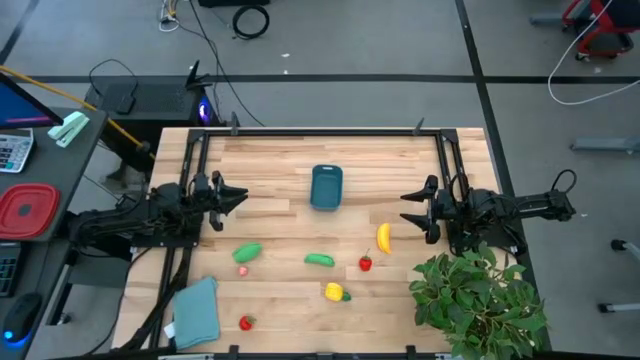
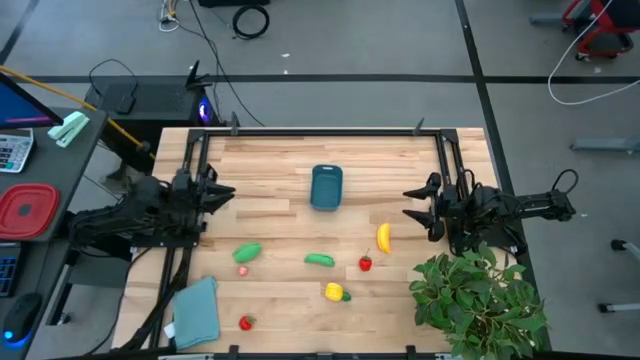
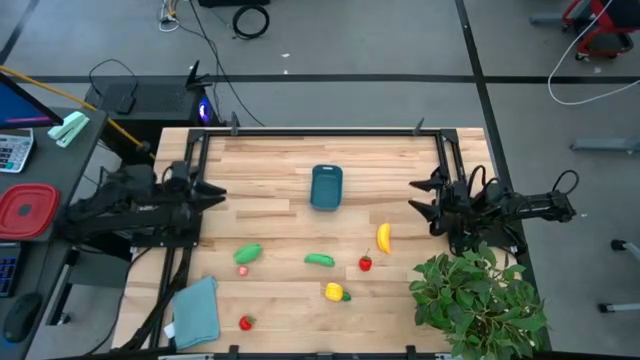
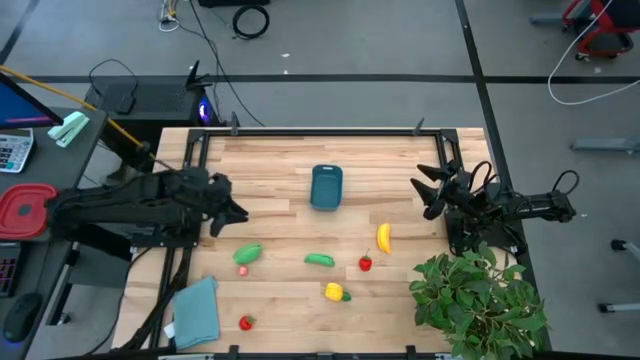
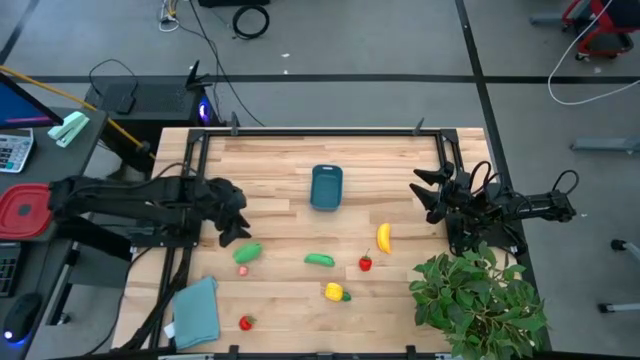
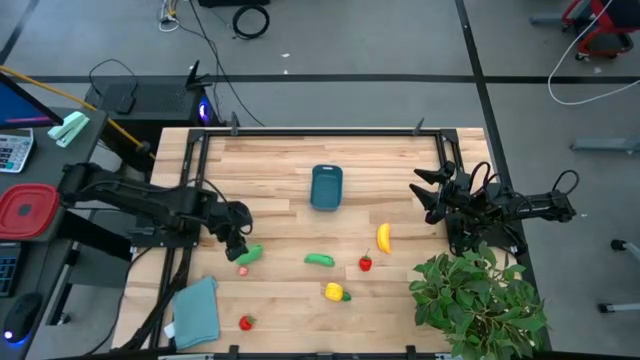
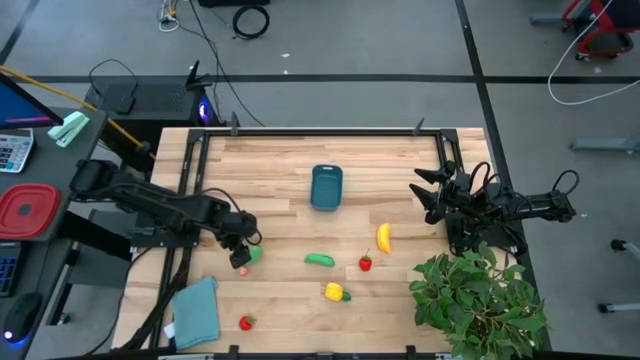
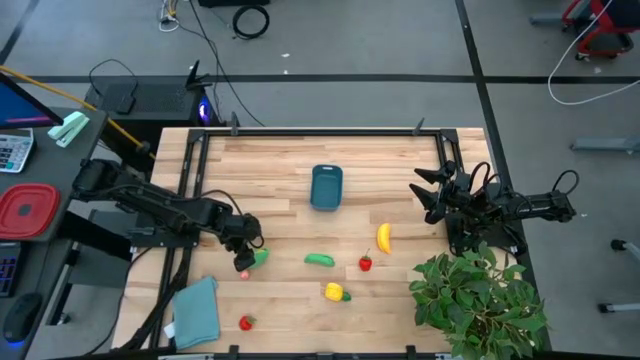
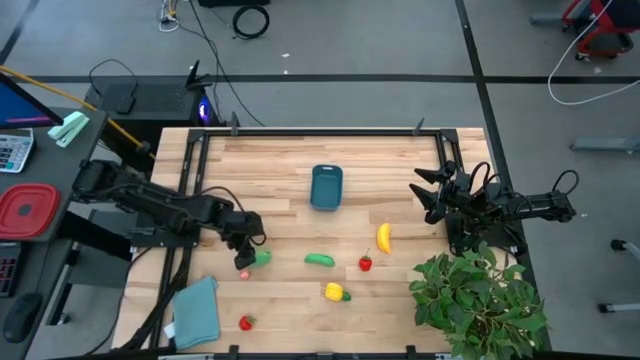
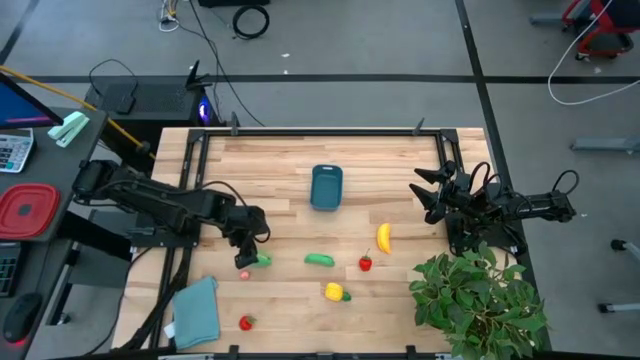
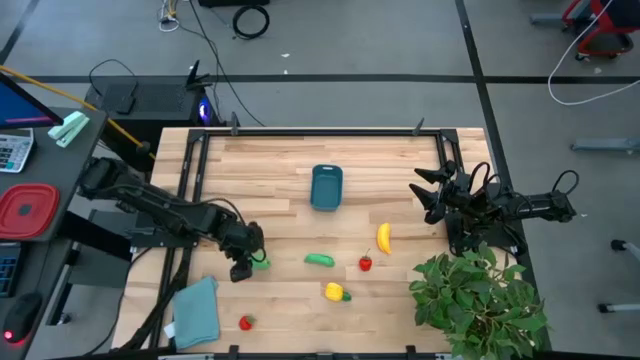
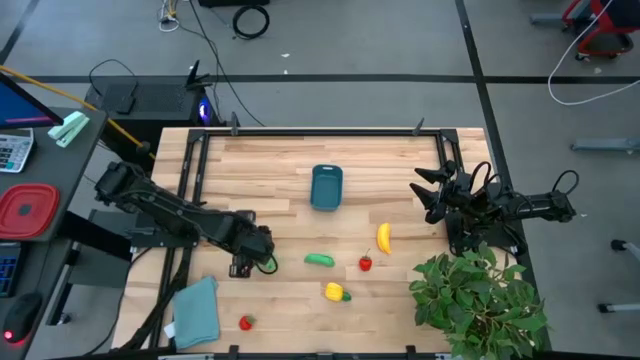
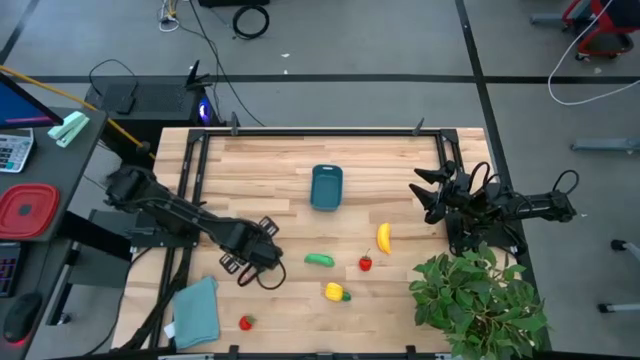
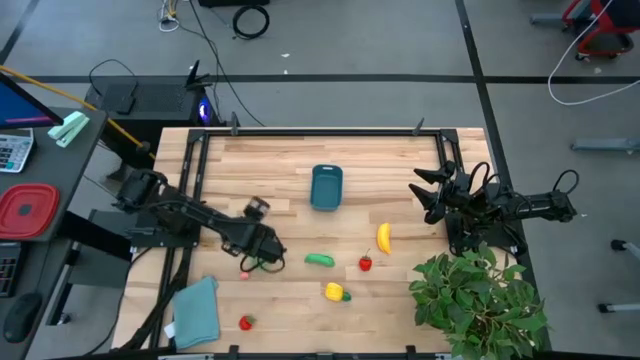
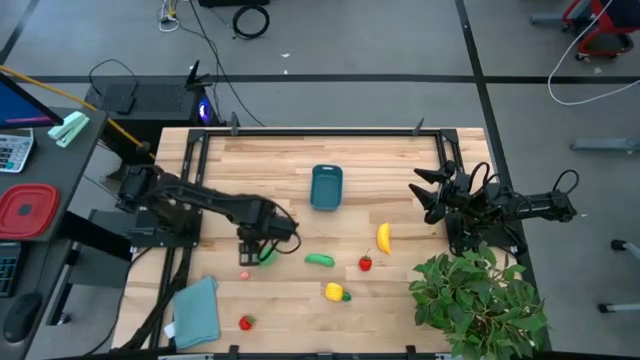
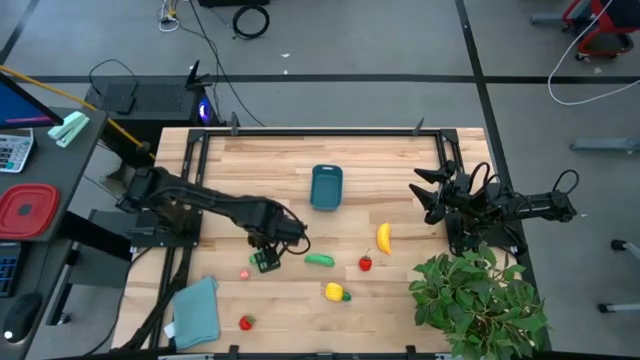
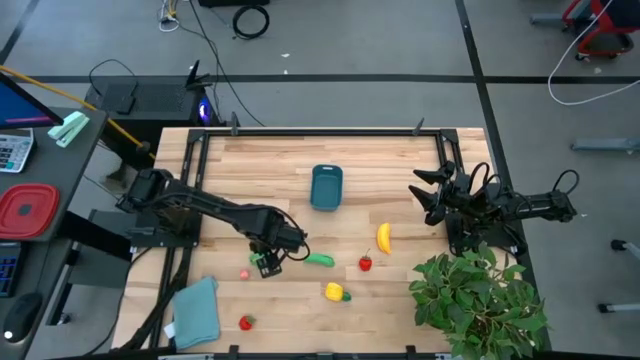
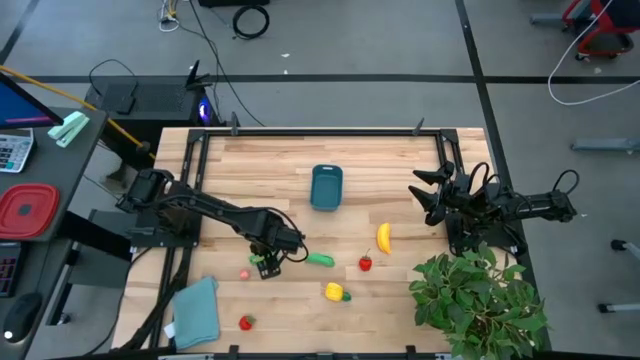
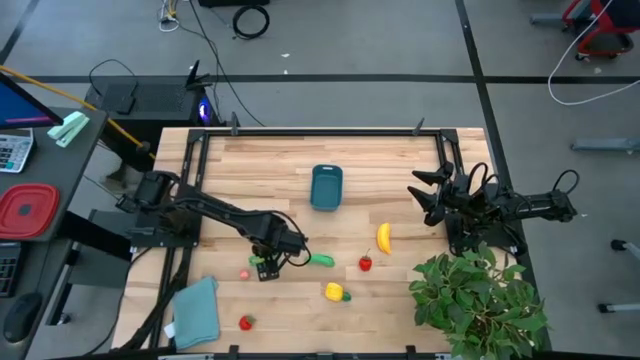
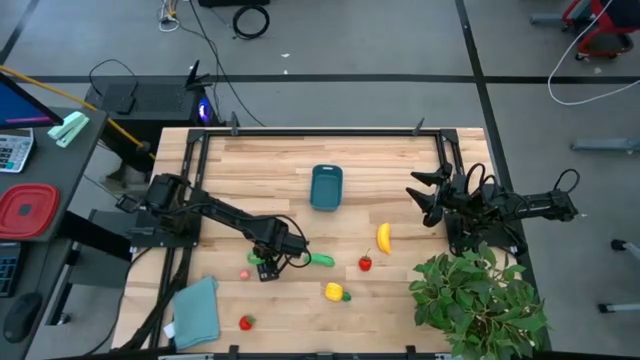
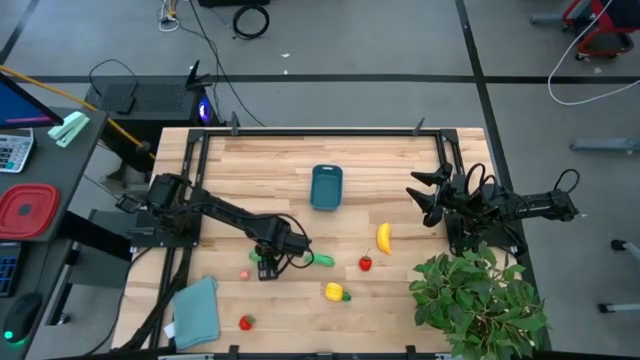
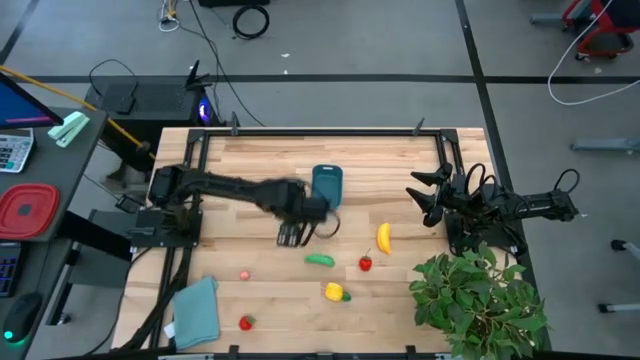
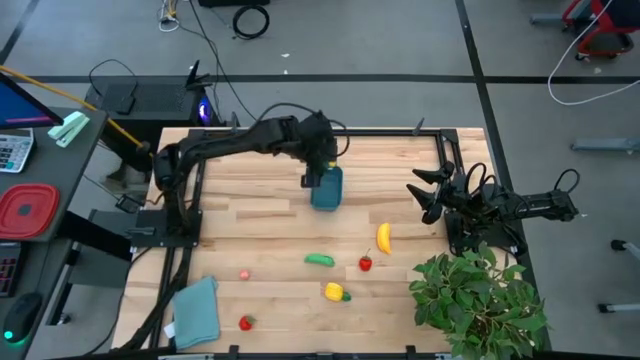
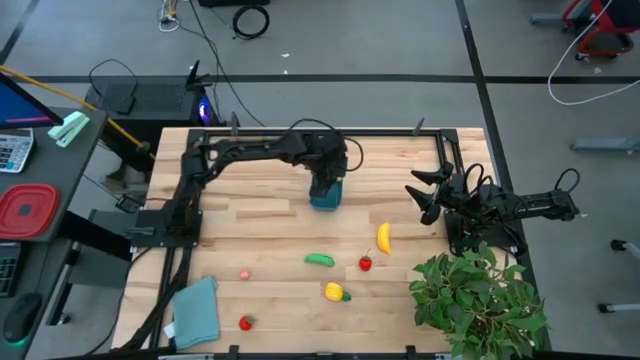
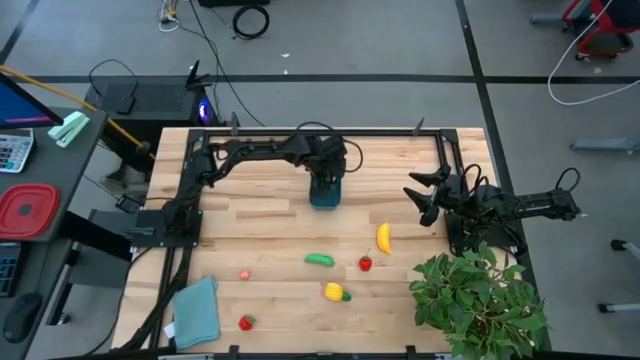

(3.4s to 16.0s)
Task: Pick and placing Produce into tupperware
Put the green corn into the blue bin

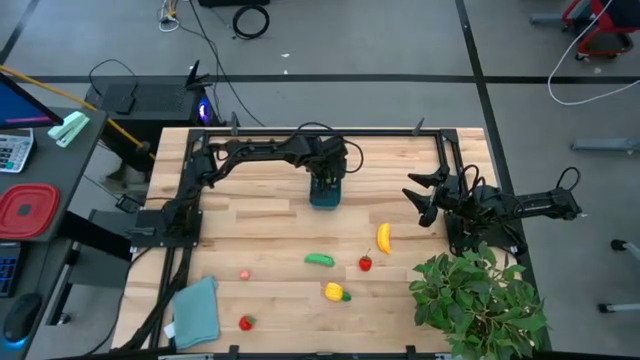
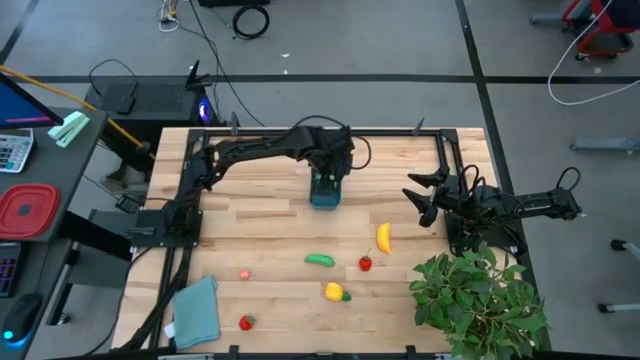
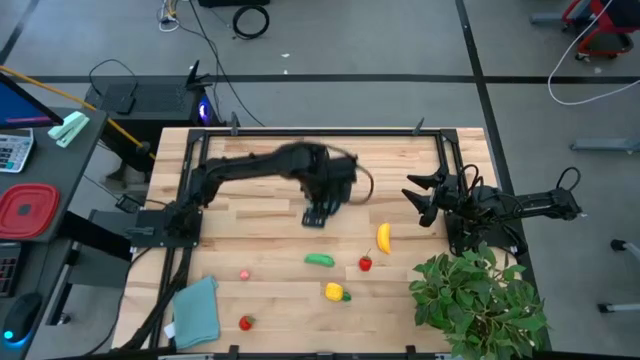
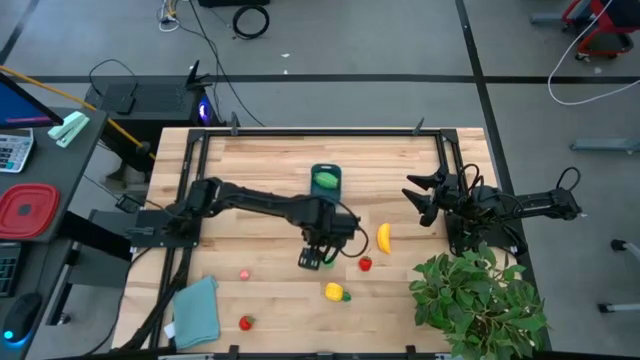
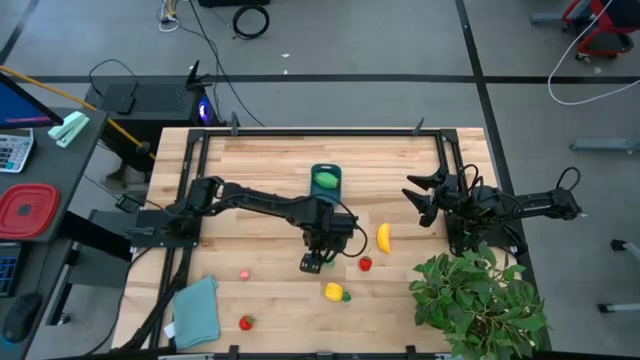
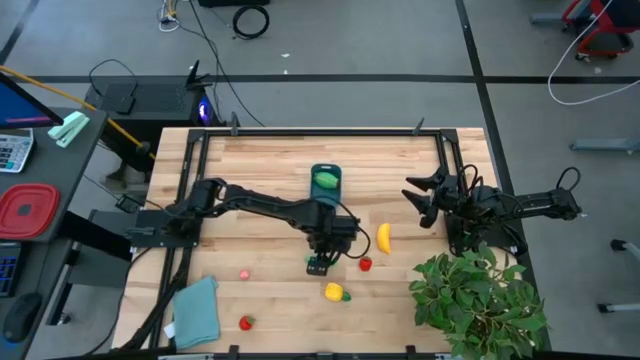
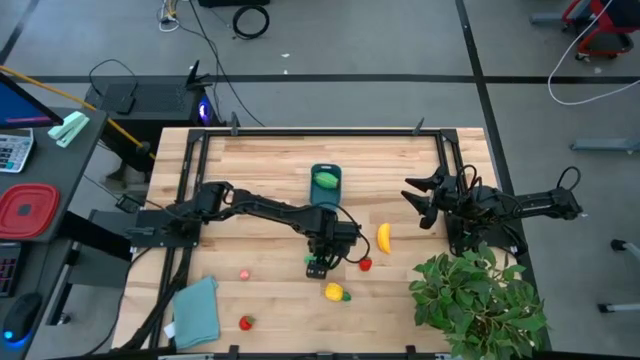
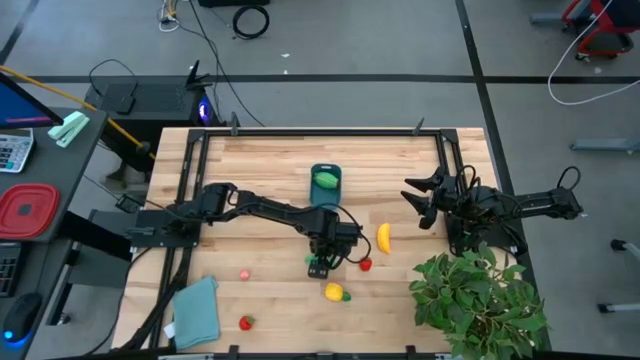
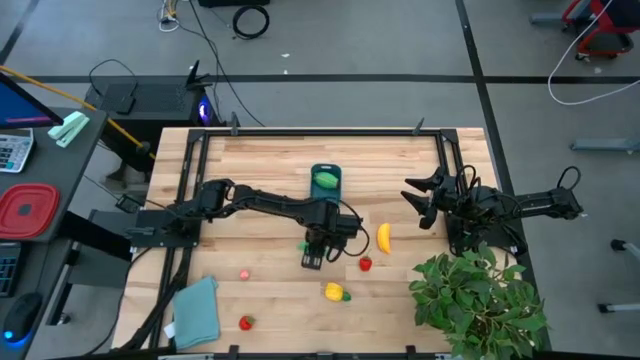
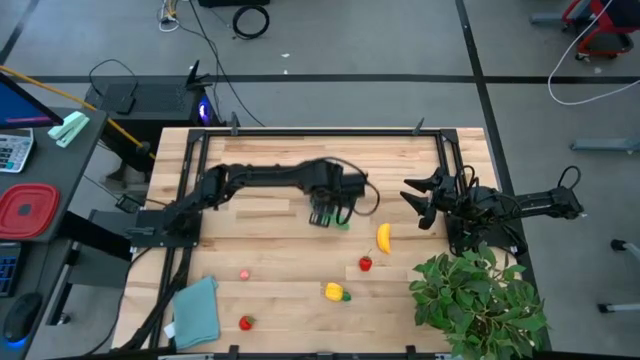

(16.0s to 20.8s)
Put the green peas into the blue bin

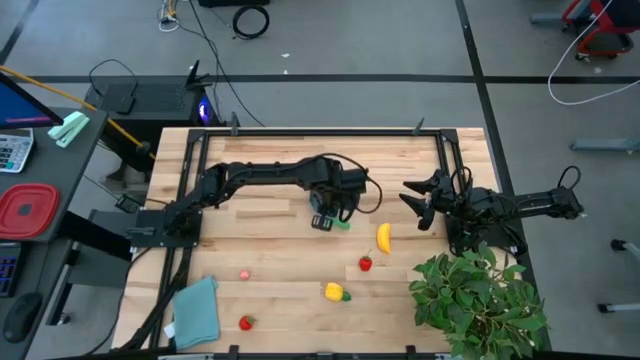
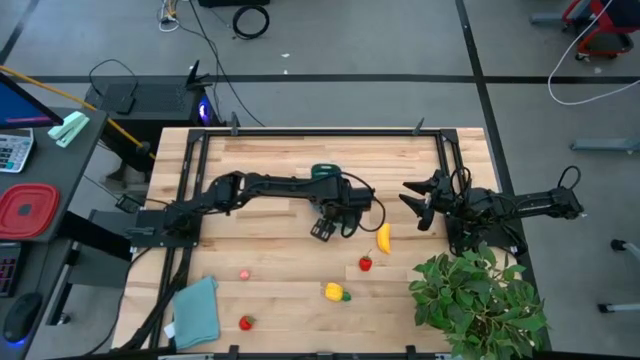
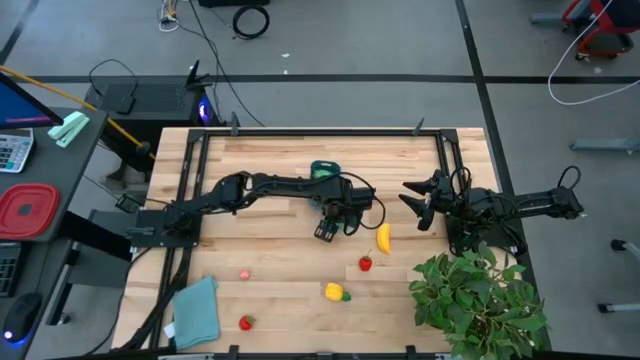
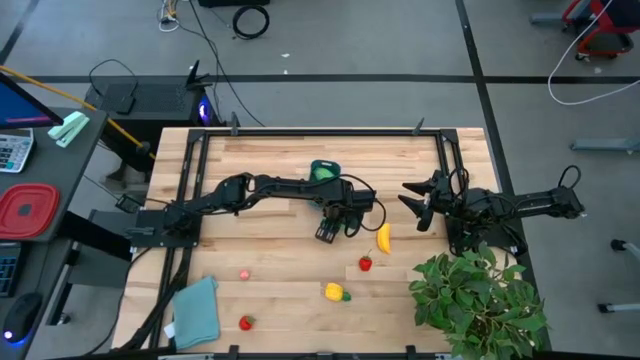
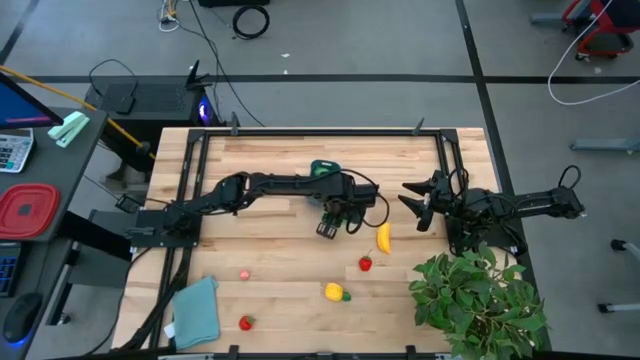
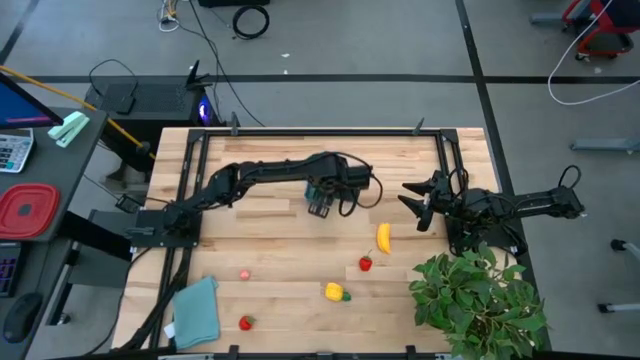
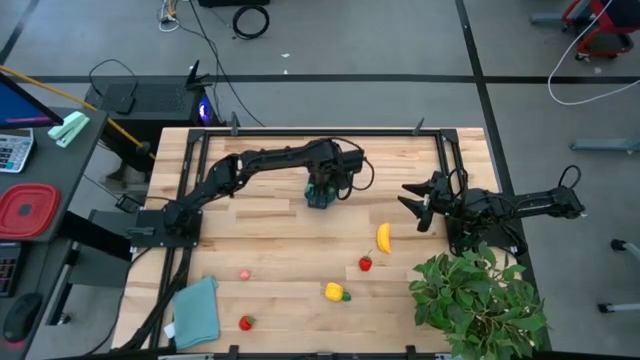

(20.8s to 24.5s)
Put the green peas into the blue bin

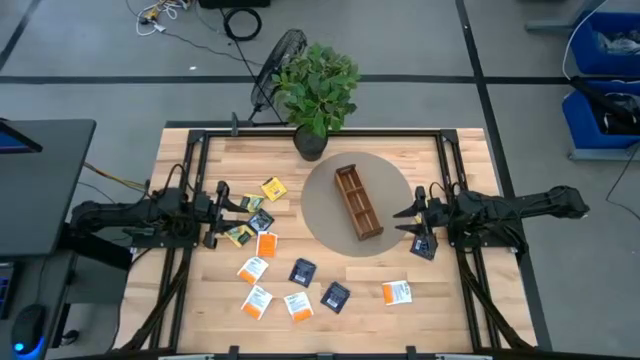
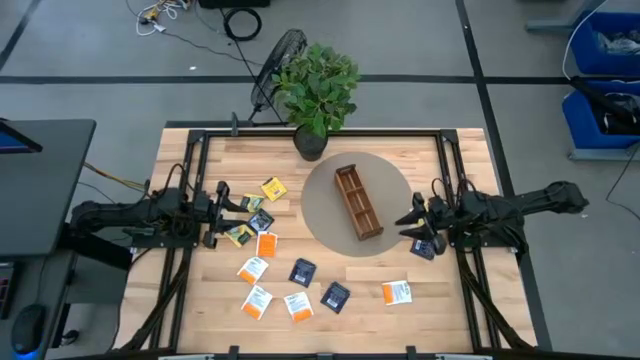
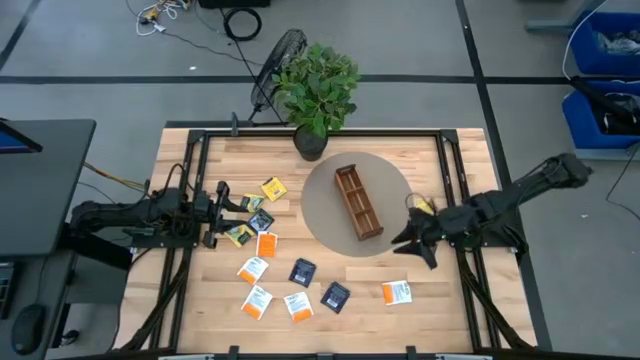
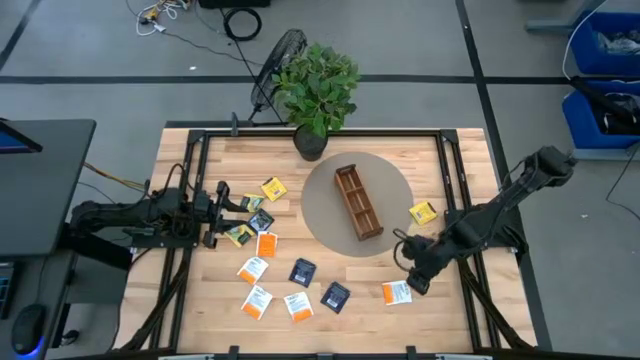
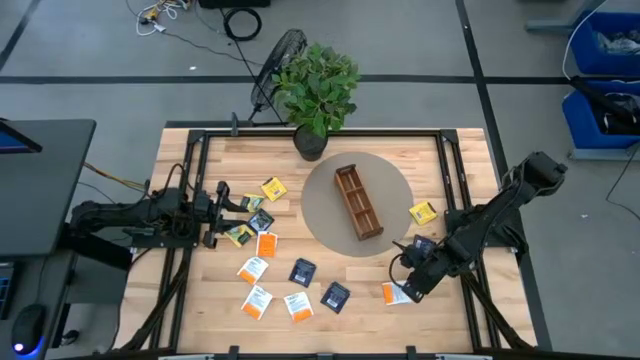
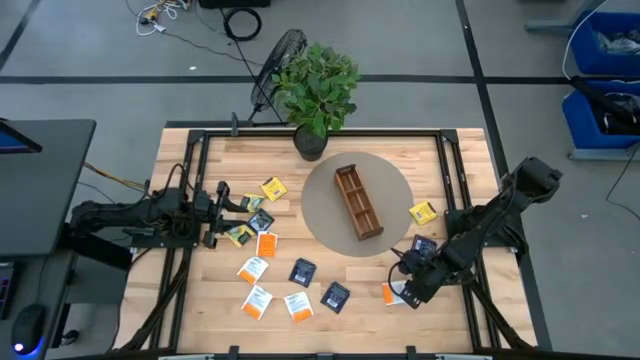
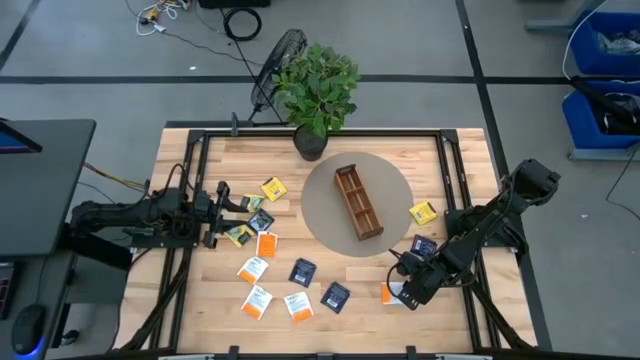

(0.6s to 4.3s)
Task: Pick & Place Tea
Put the white tea bag into the bottom section of the wooden organizer
